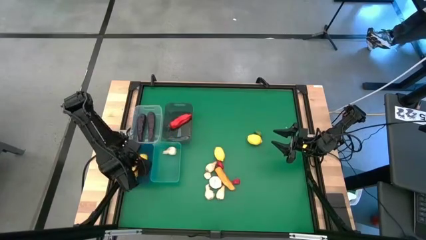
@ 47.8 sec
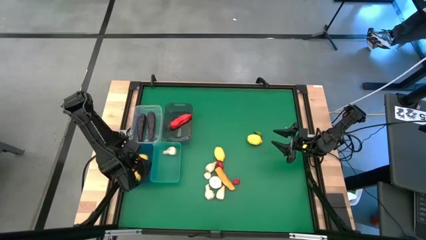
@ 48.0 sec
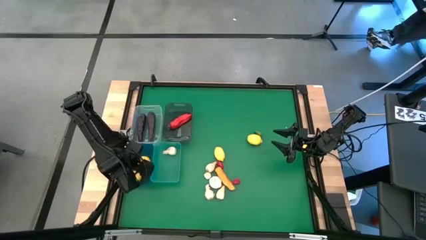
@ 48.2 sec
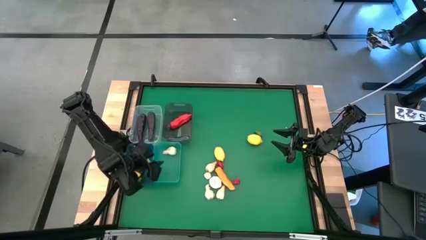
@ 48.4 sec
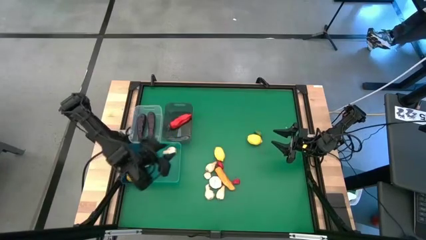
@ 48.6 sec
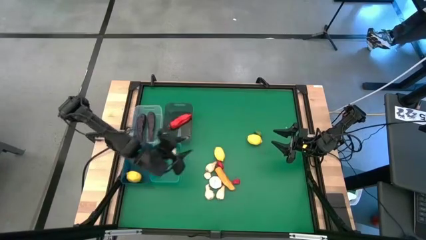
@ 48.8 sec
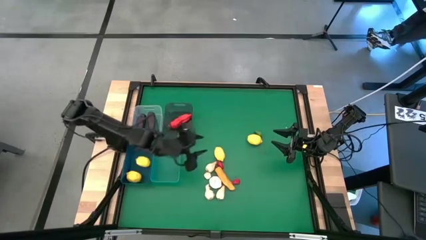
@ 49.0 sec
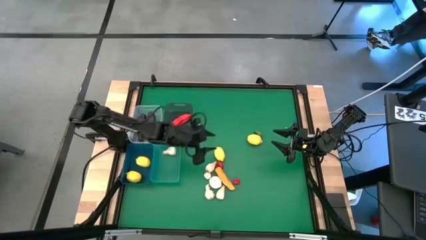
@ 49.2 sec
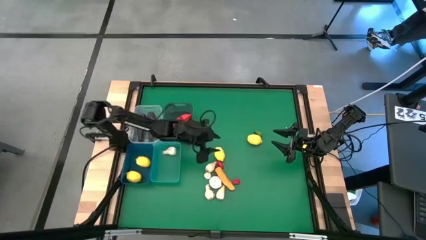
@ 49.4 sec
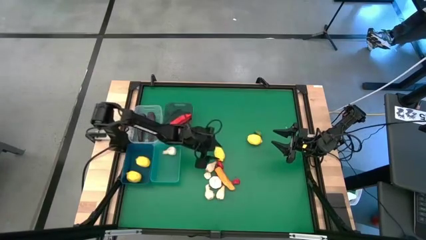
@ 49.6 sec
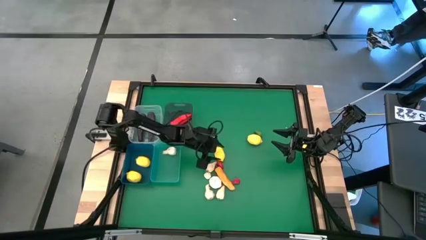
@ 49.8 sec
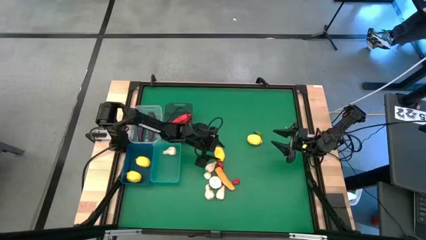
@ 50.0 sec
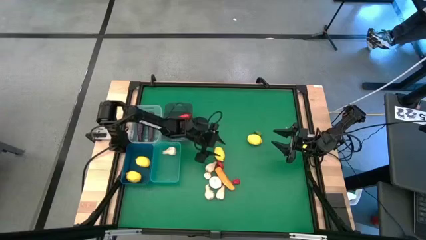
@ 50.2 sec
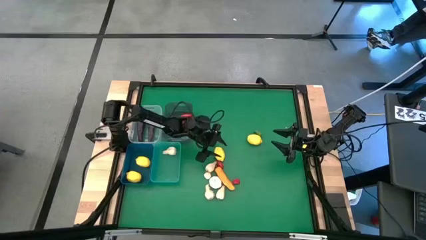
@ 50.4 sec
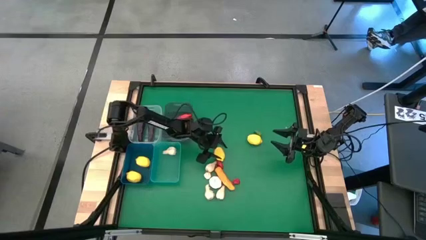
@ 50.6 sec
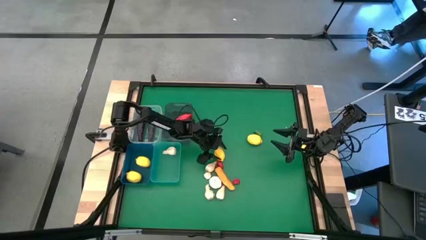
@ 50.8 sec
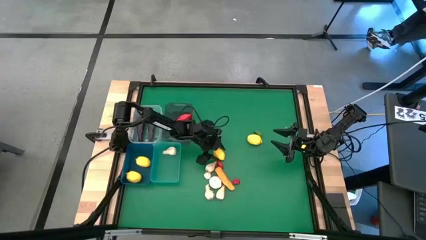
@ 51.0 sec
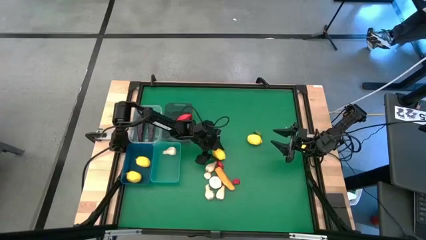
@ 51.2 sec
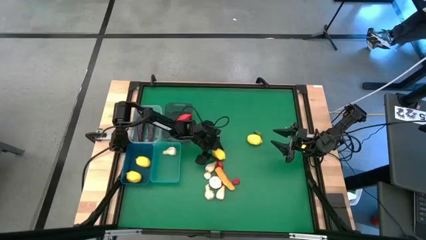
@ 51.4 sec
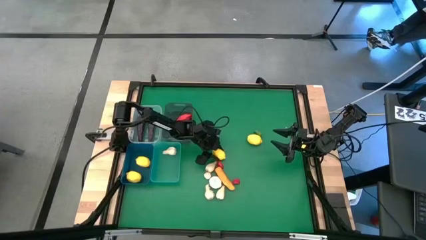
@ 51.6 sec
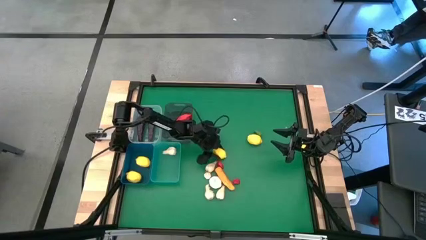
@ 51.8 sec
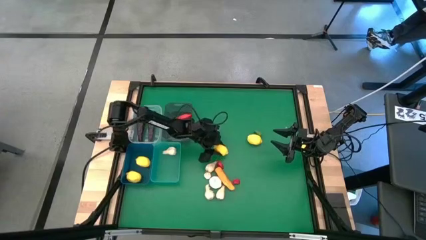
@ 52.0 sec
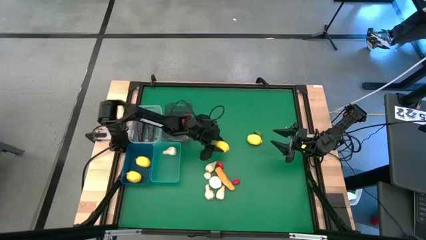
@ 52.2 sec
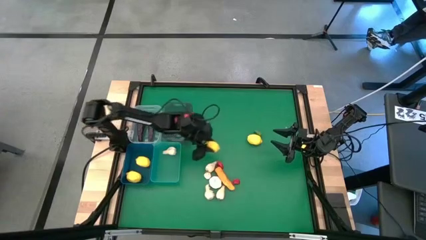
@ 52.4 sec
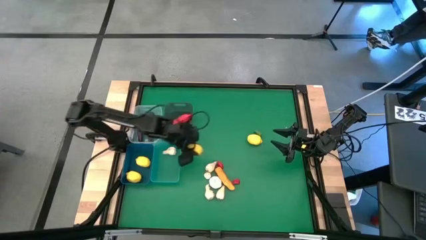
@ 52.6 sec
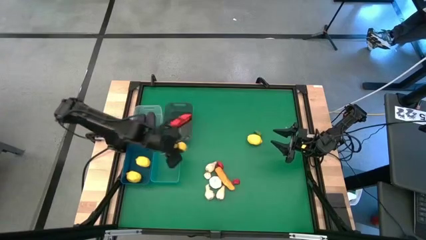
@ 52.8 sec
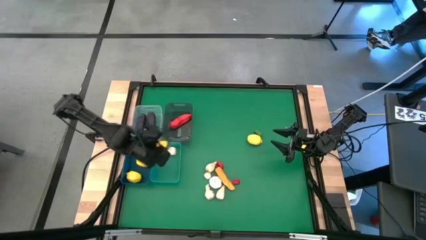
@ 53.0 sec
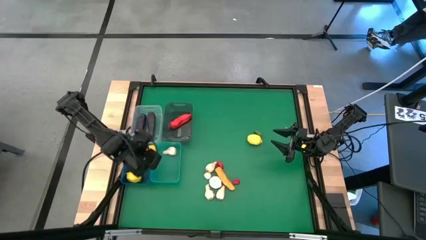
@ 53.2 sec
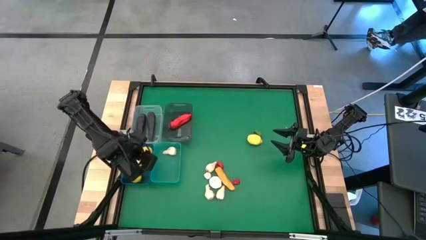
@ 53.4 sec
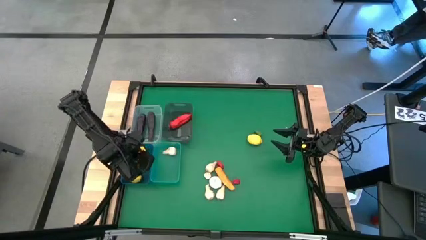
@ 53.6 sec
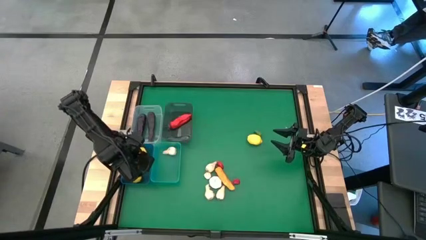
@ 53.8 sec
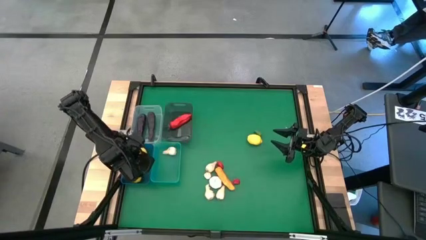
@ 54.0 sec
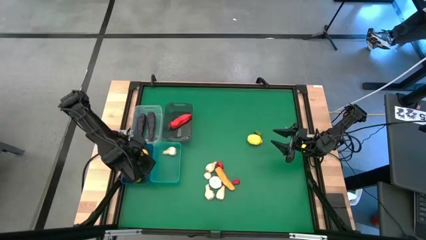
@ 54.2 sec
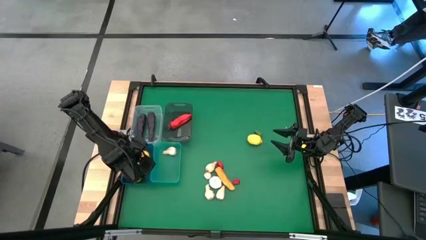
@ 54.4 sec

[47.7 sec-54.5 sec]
Task: Sort produce into baskets
Put the yellow lemon into the blue bin

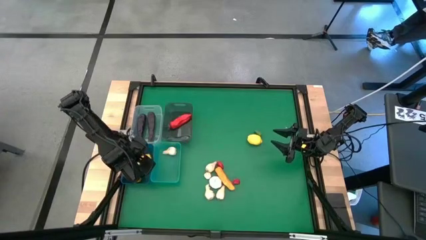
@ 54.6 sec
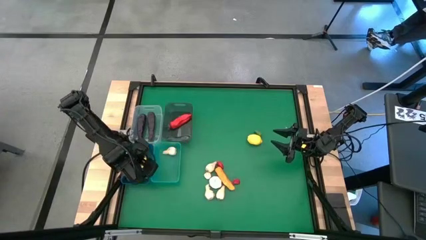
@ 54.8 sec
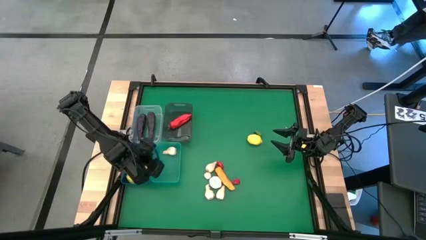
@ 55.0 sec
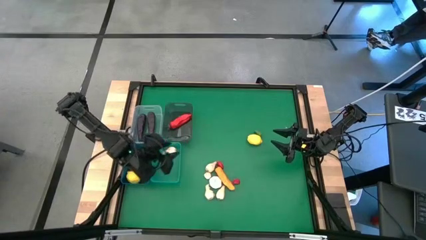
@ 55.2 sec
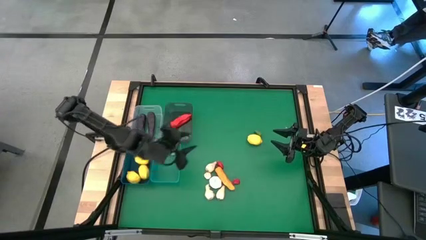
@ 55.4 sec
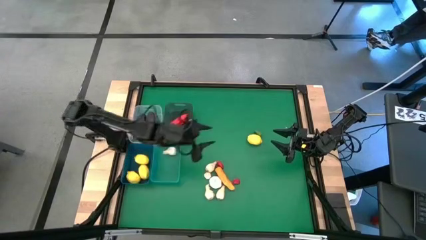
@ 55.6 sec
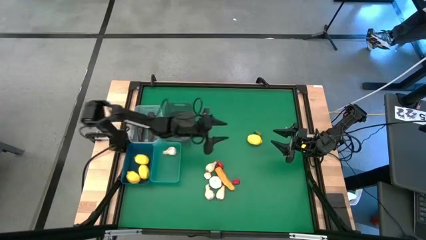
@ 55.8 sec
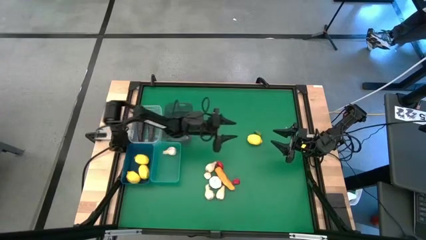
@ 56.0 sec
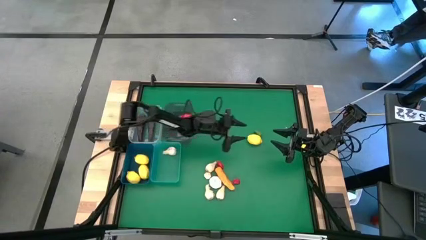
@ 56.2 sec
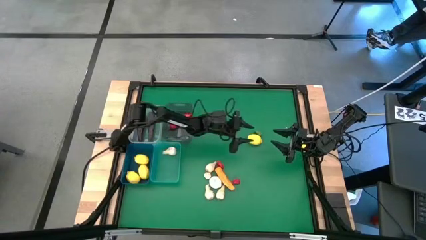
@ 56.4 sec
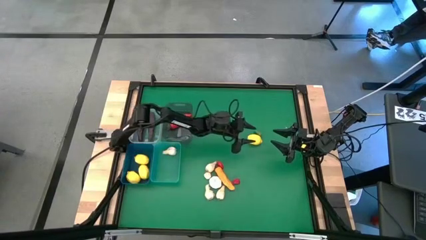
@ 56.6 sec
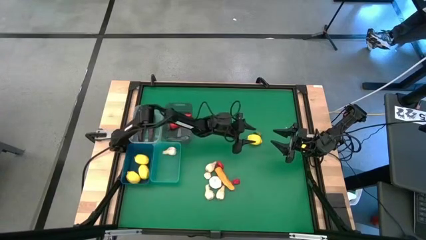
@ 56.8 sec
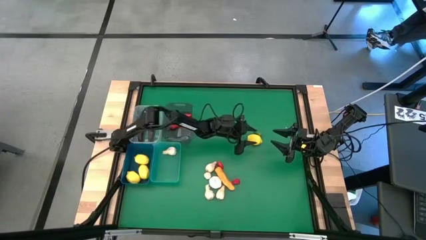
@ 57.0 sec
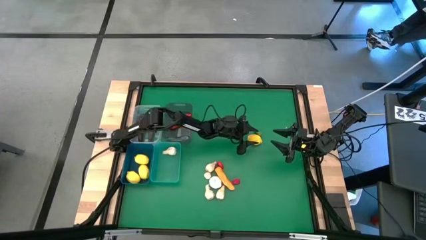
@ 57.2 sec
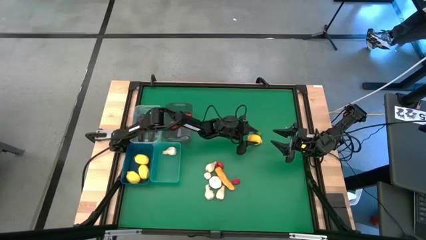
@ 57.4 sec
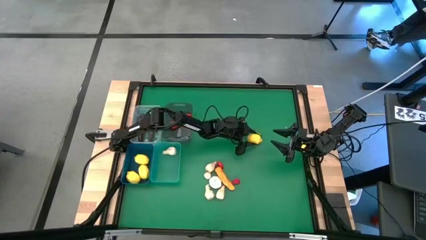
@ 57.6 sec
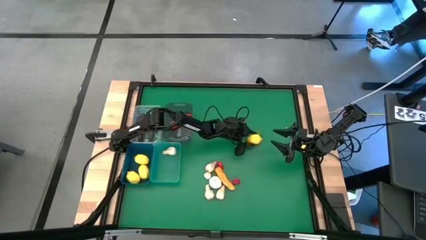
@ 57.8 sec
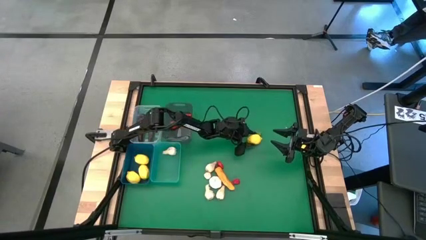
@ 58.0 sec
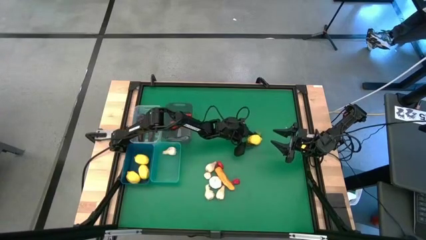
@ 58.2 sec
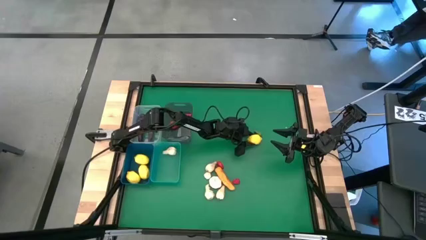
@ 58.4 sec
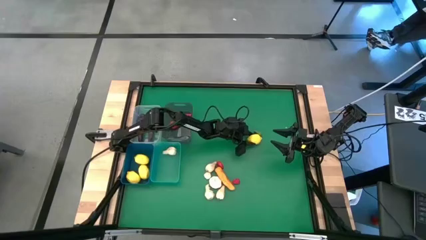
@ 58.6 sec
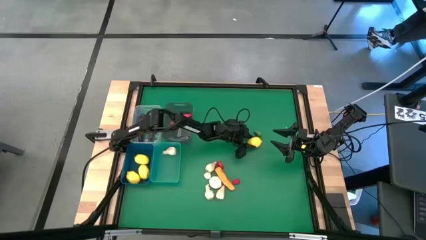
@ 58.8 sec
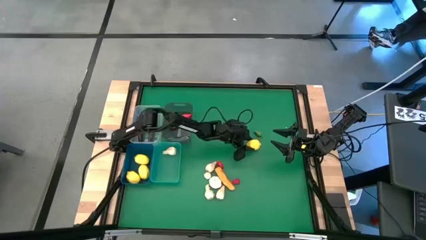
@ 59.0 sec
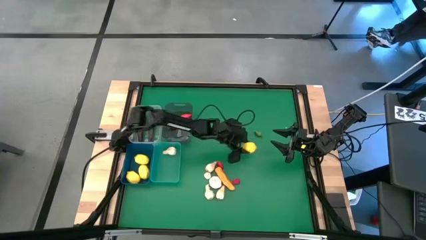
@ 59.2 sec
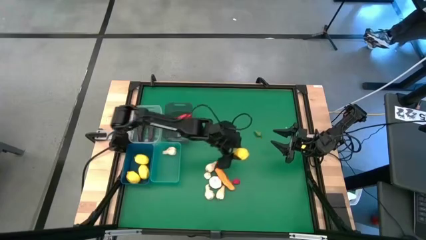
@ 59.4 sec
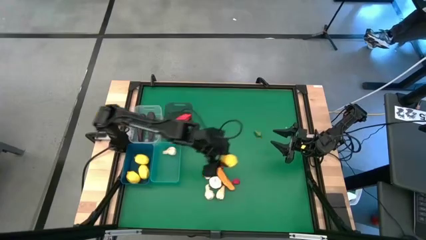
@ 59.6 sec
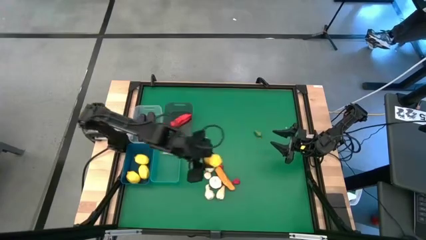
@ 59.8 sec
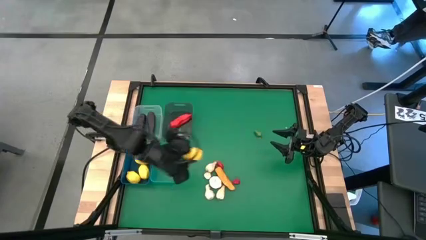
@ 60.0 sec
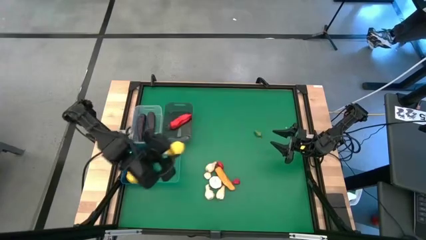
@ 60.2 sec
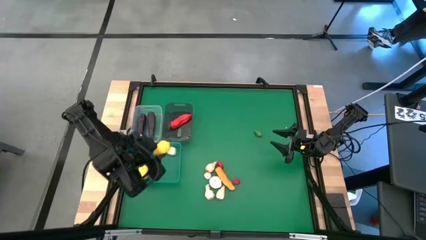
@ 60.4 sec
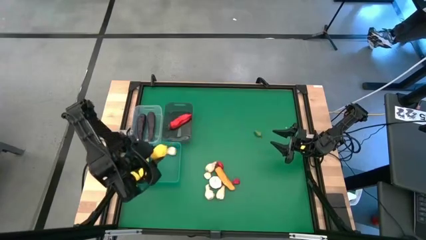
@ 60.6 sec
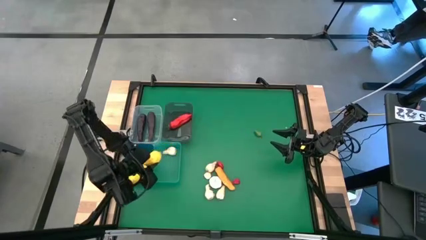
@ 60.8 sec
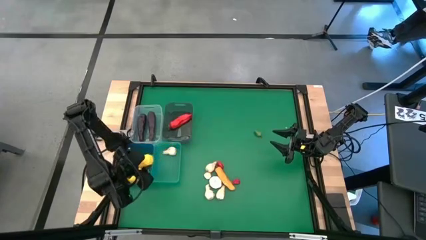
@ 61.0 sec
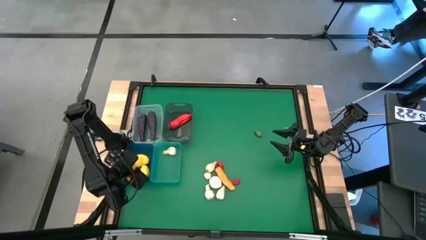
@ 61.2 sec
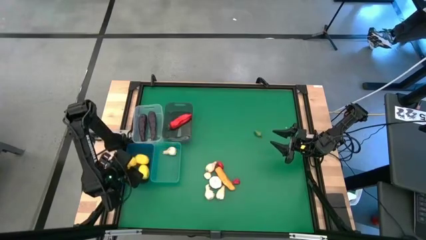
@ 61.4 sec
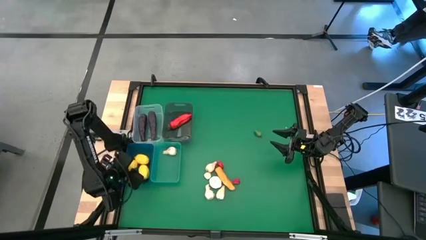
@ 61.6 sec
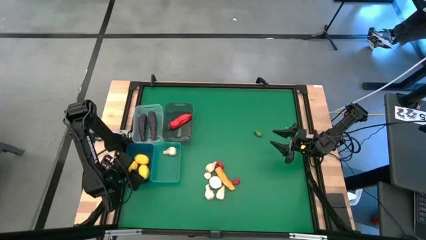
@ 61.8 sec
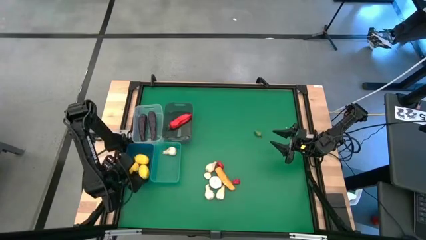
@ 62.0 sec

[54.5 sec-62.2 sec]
Put the yellow lemon into the blue bin

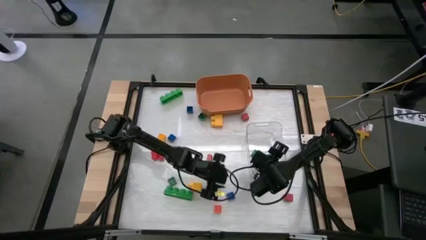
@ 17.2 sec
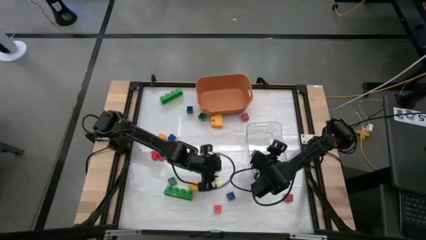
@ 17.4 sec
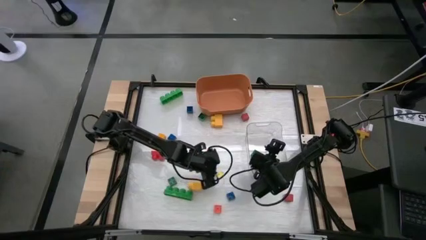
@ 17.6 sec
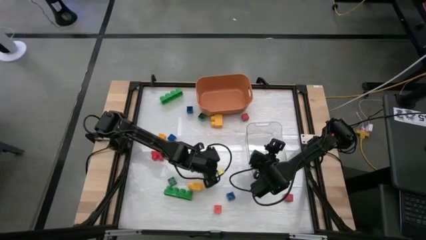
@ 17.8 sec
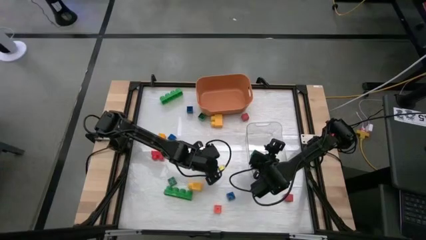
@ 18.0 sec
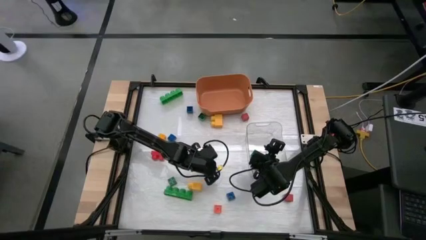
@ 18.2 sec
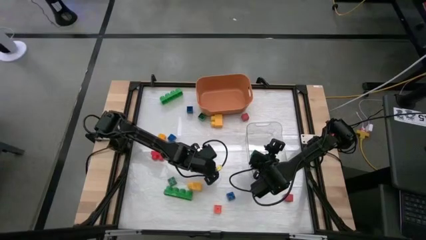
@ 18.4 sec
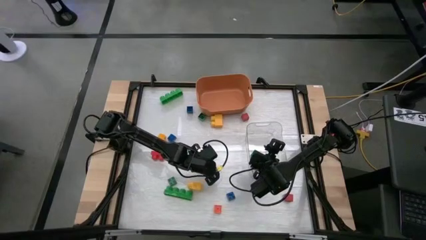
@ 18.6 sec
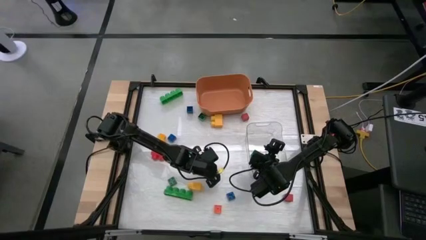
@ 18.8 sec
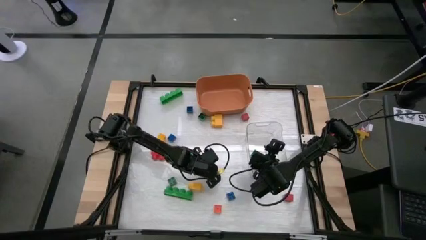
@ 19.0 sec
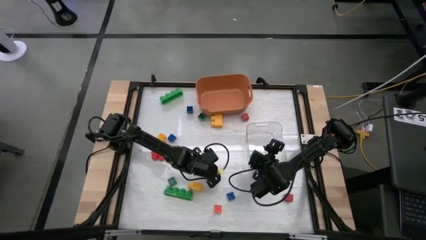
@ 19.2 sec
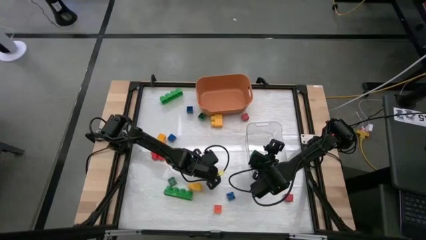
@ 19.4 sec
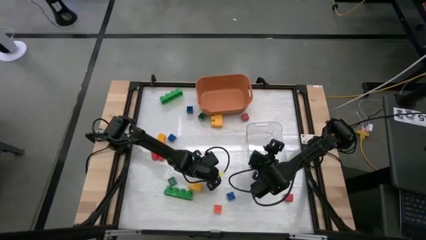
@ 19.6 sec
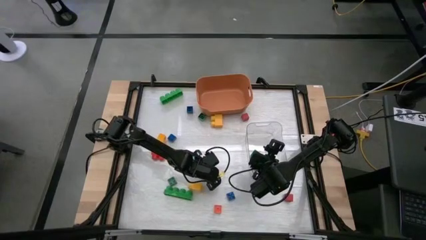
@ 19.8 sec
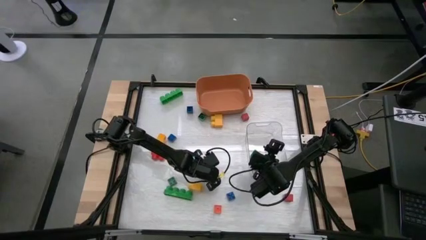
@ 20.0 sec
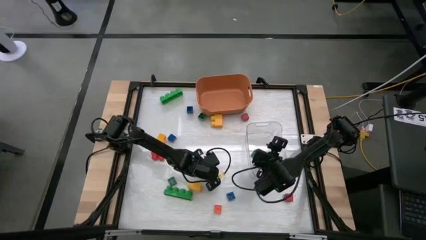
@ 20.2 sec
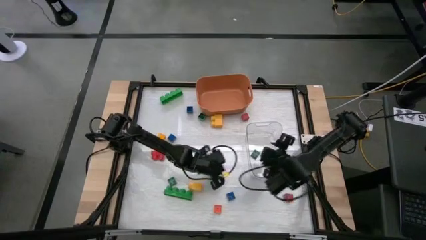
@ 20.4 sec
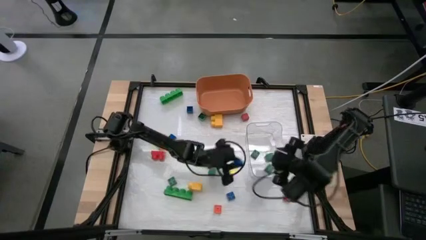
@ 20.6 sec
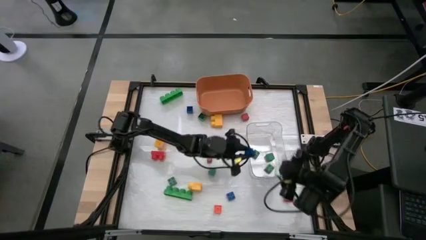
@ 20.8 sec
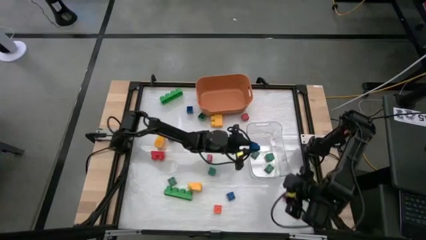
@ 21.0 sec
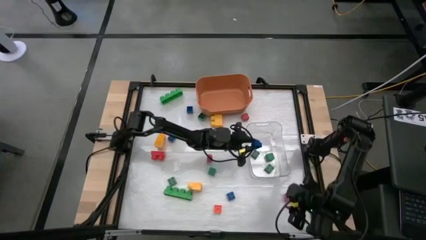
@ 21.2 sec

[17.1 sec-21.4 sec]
Task: Sort blocks by size
Put the small blue game piece into the transparent bin
